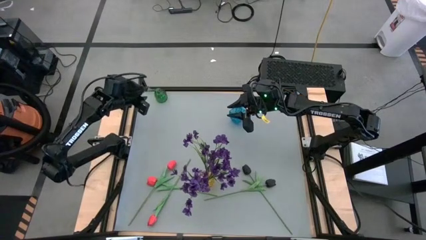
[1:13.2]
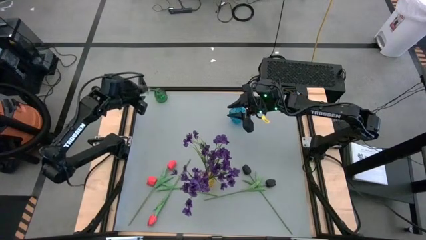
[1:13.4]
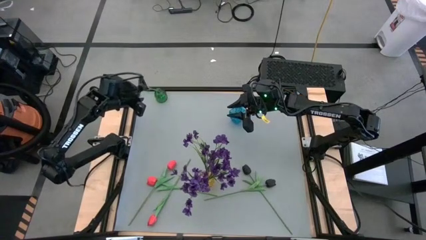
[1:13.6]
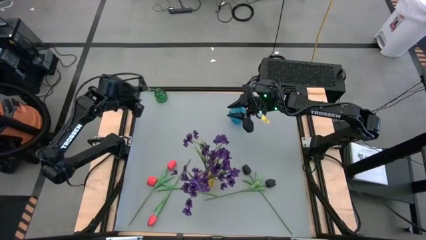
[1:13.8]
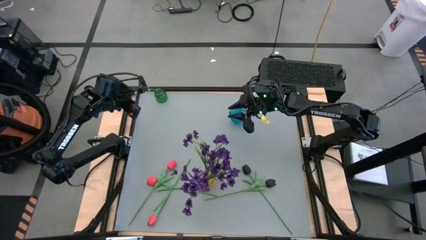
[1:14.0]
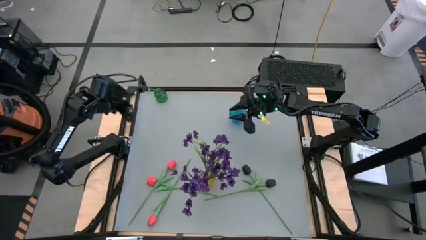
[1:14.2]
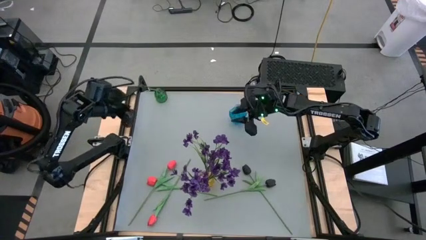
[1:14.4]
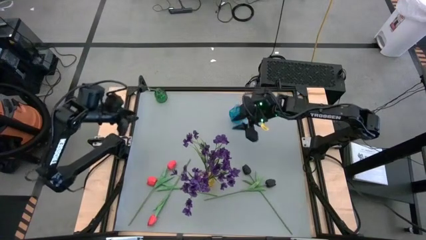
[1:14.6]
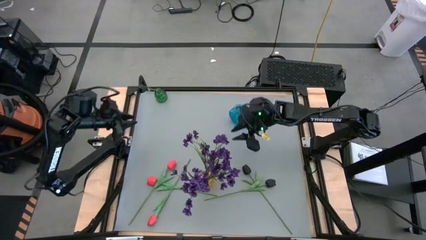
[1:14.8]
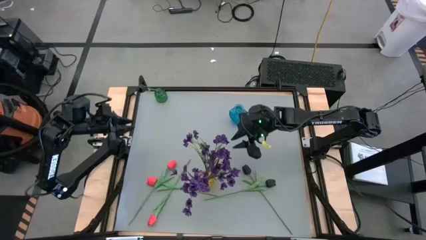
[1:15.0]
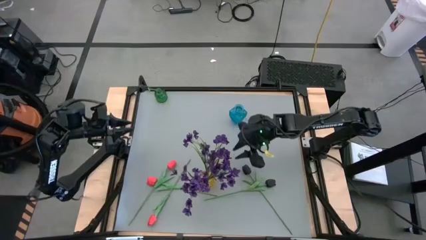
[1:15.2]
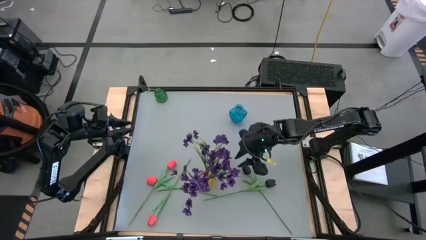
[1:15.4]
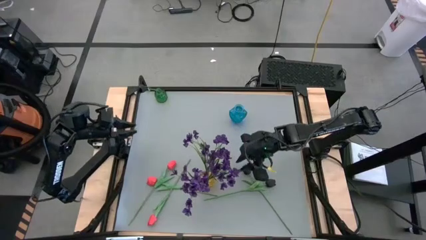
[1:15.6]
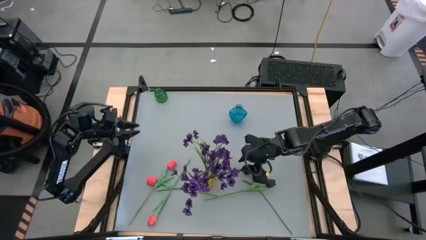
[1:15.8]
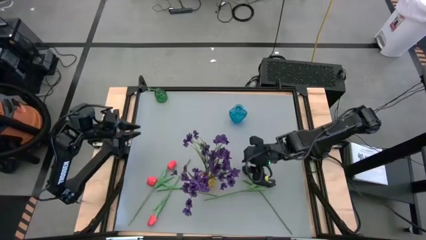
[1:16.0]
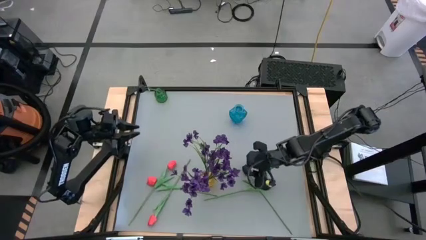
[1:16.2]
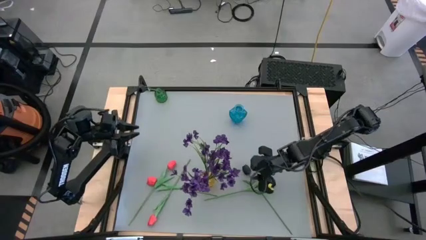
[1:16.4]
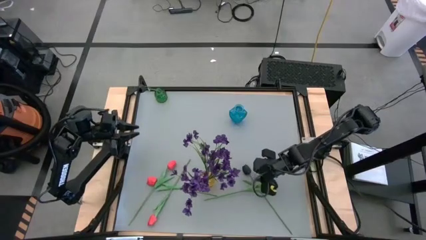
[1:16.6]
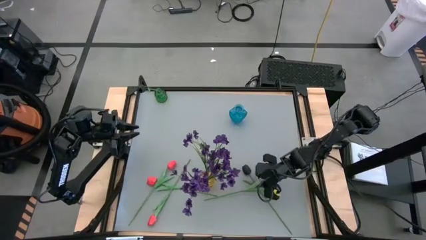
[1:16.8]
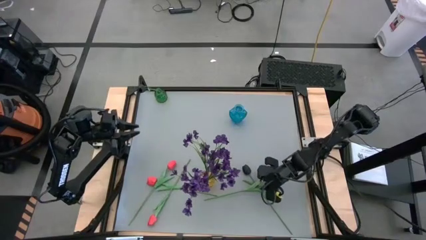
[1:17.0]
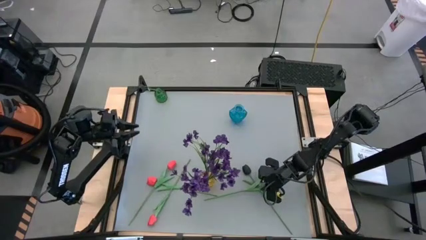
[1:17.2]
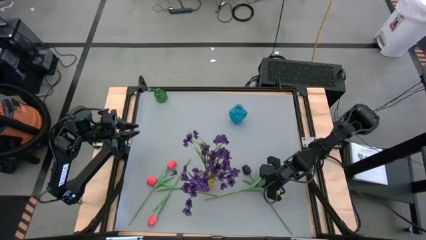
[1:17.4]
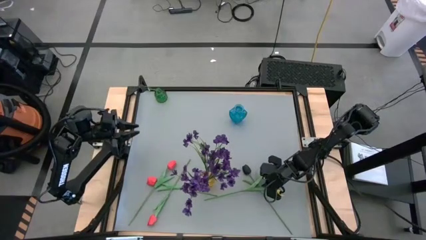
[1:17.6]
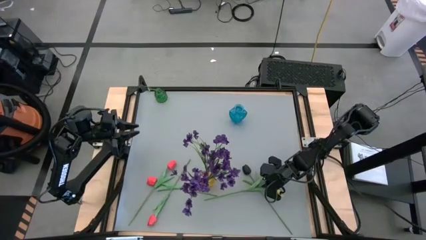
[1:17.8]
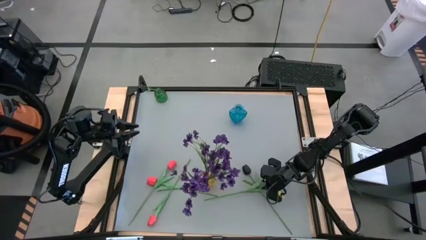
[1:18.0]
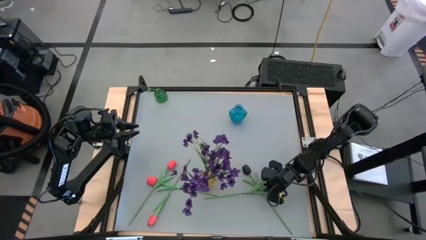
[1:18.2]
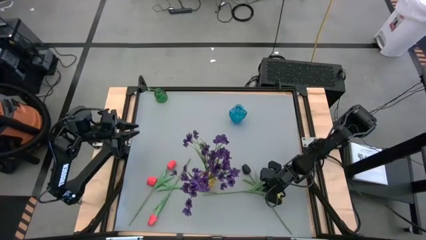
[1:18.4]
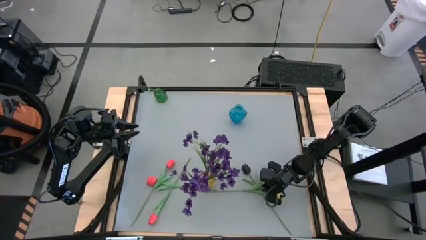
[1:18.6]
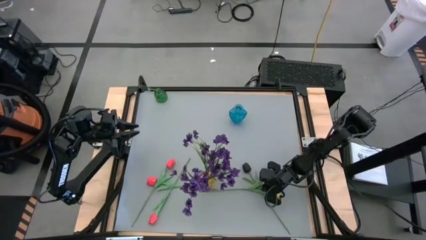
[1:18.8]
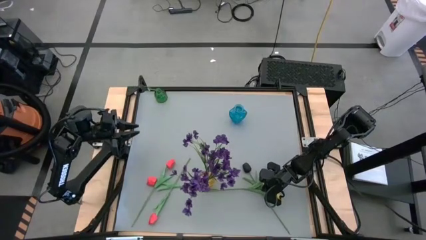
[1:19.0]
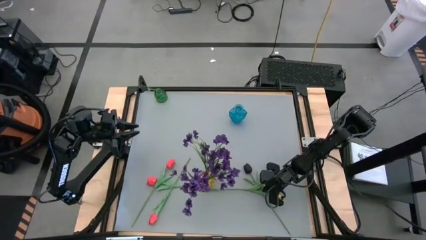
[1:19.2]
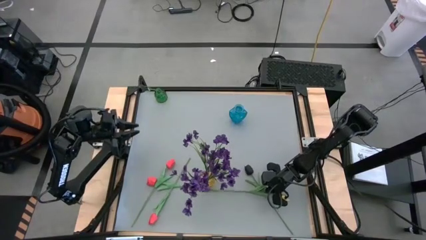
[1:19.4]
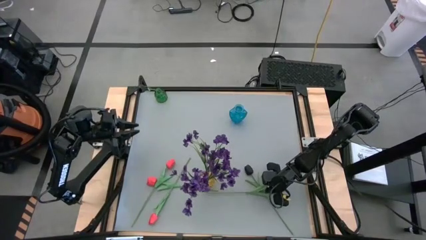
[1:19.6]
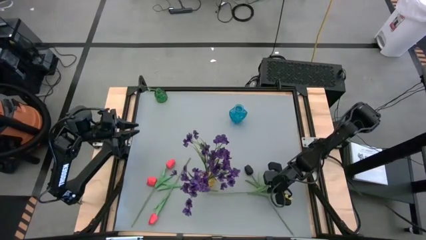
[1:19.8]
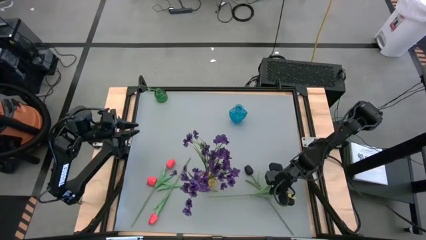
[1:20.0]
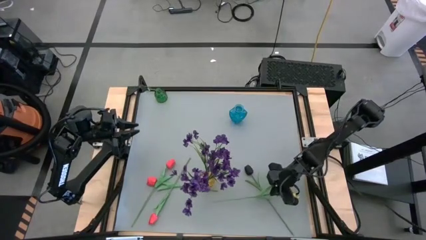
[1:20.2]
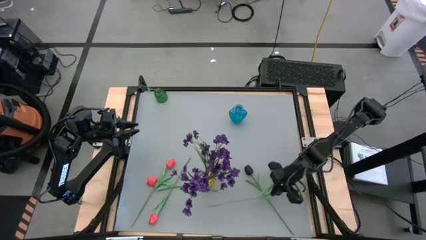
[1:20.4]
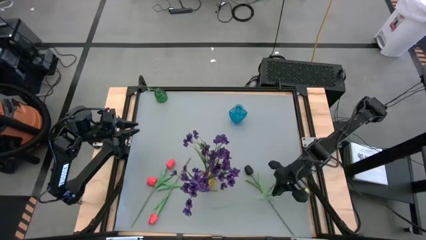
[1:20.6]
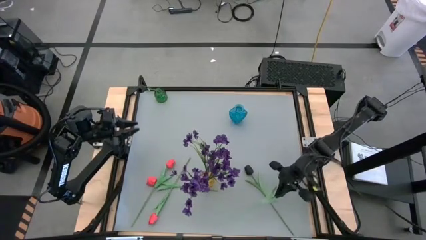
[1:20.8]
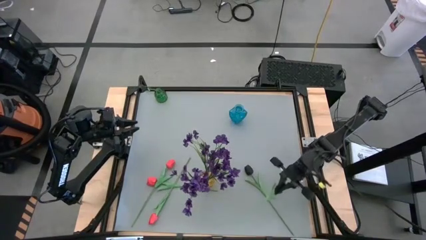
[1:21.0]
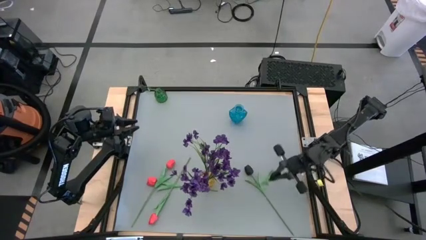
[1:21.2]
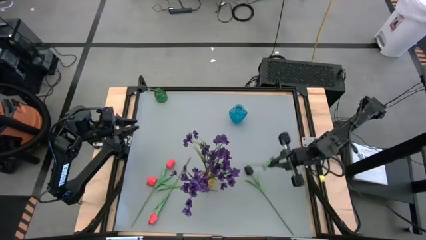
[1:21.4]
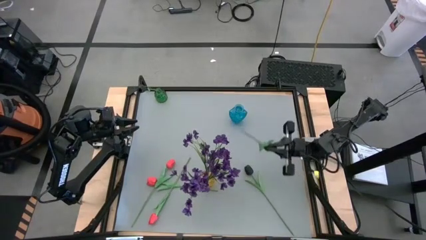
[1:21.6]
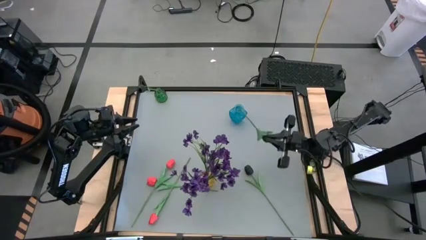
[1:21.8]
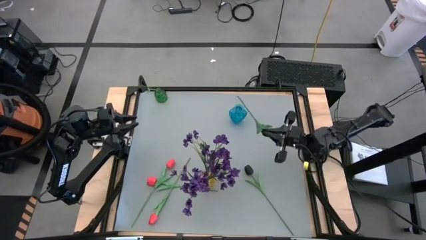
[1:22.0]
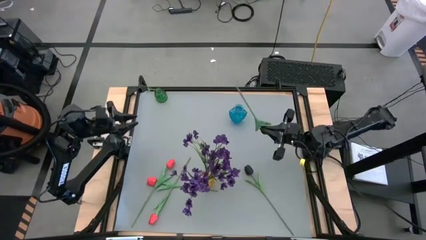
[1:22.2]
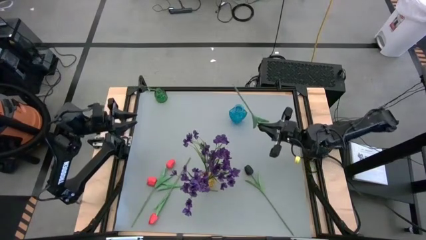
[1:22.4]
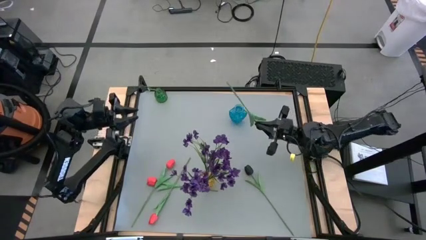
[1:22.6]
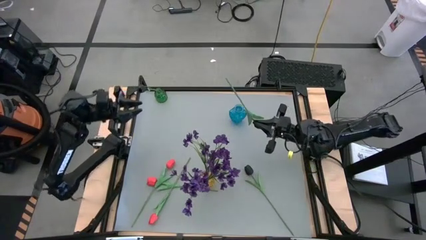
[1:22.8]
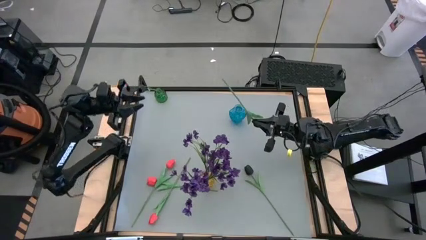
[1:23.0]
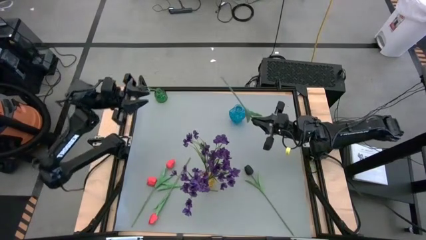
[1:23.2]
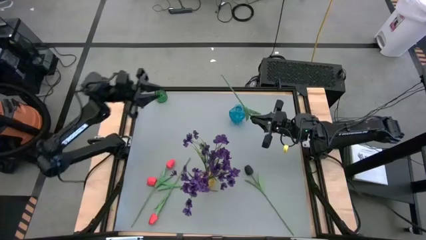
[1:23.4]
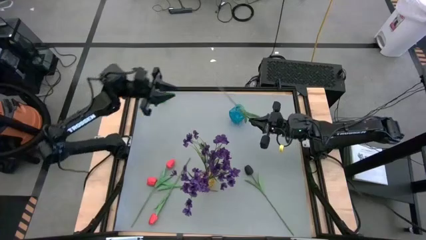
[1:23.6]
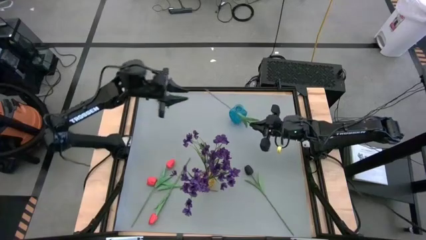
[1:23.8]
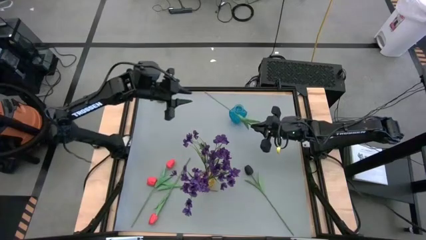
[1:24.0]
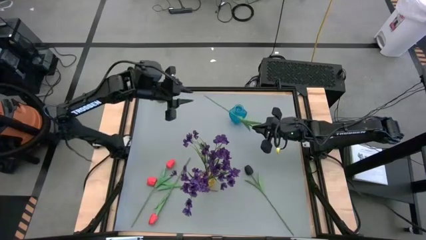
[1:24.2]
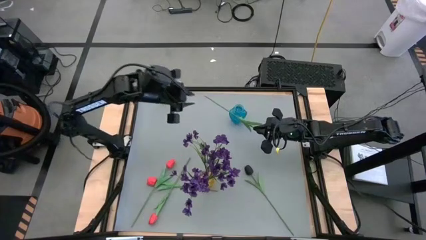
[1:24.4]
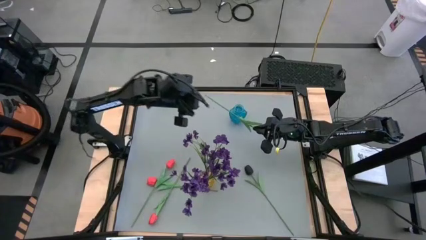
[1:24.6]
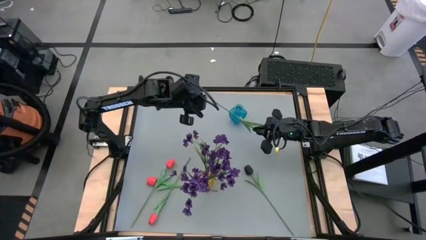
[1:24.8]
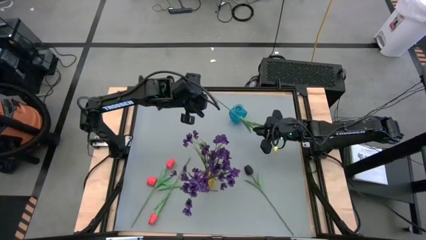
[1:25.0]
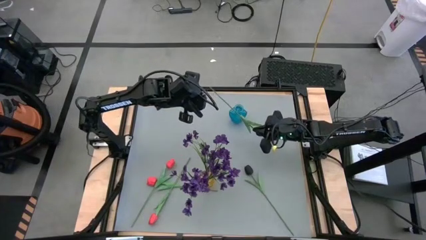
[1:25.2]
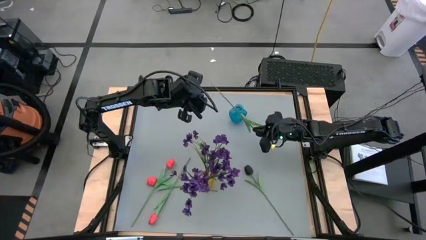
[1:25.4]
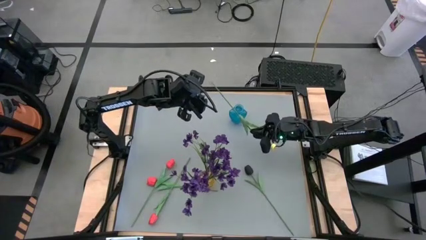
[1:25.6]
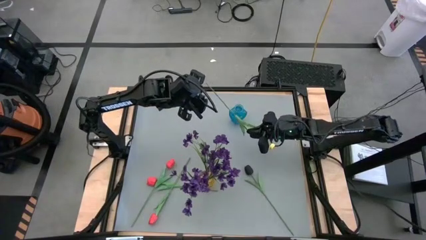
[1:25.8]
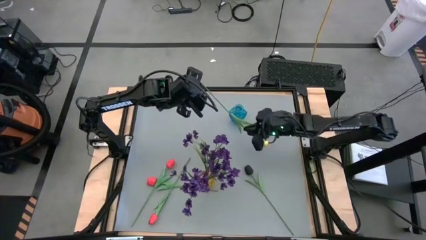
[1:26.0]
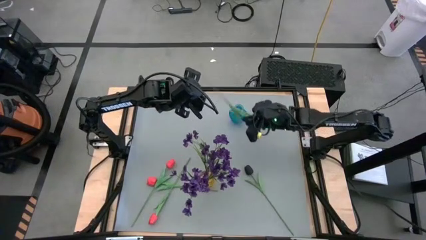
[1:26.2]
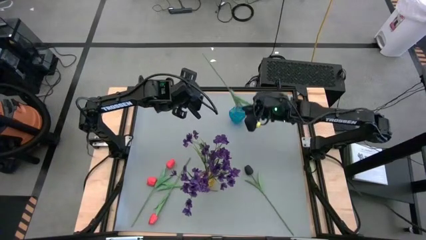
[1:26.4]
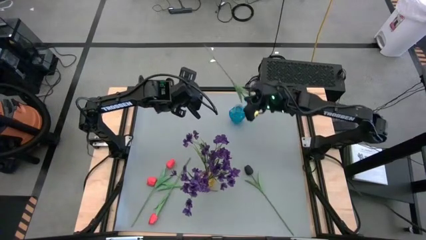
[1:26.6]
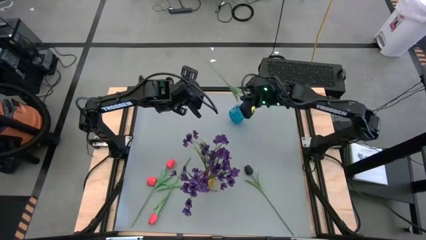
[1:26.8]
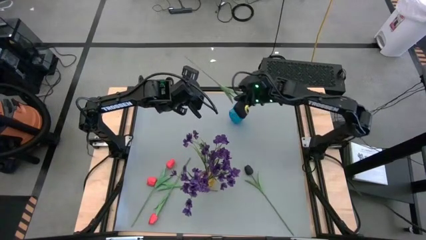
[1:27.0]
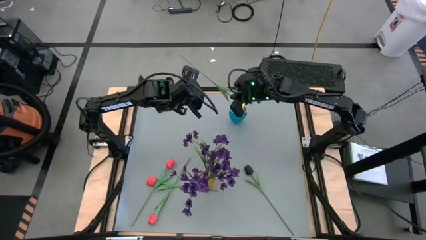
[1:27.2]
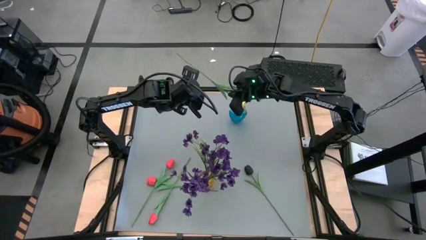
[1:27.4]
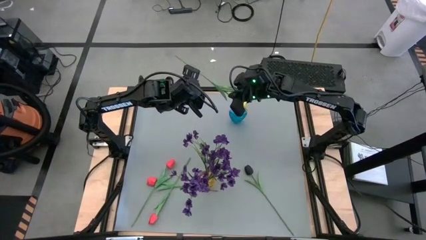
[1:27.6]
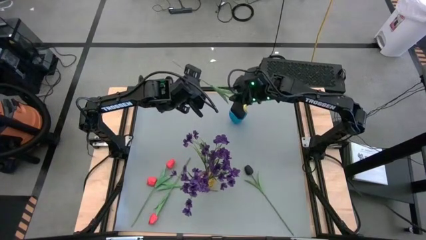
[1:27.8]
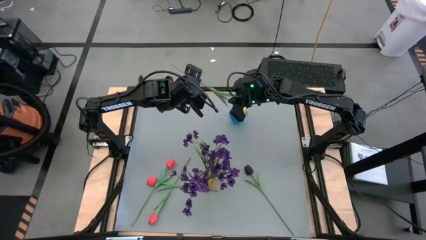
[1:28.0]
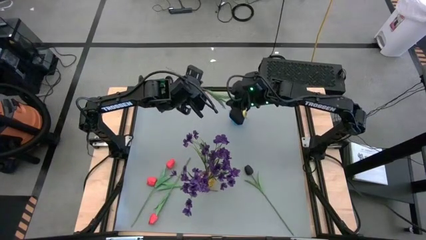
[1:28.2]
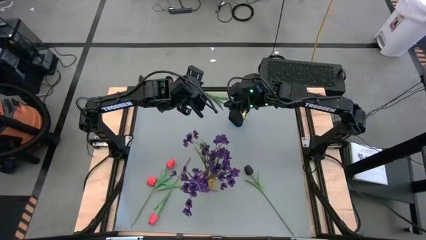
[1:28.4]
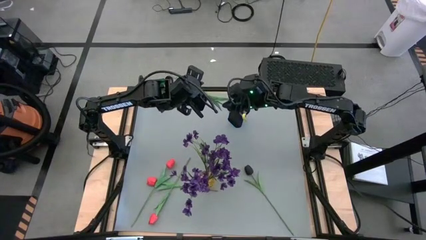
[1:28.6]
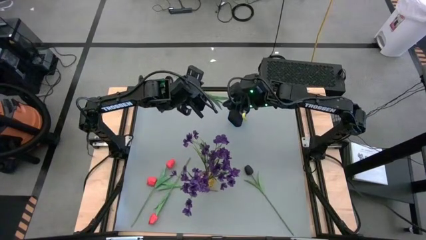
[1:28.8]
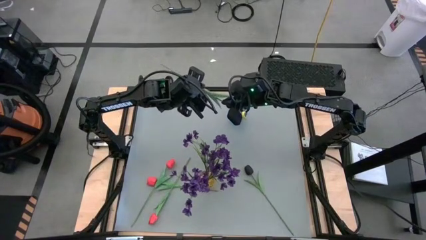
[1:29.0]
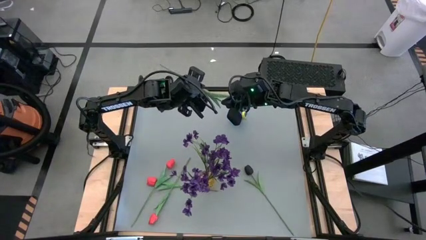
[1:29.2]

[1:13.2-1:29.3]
Task: Sort flowers into vase by color
Put the bottom black flower into the green vase
